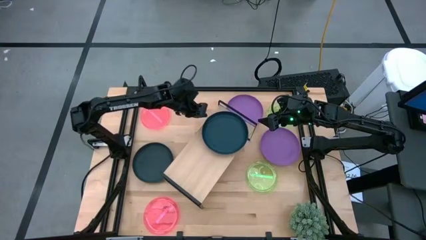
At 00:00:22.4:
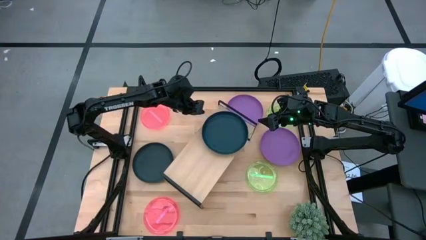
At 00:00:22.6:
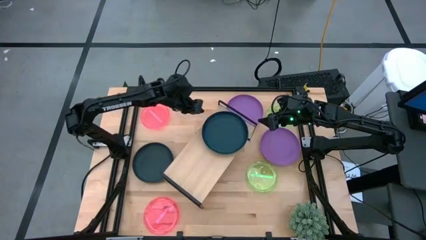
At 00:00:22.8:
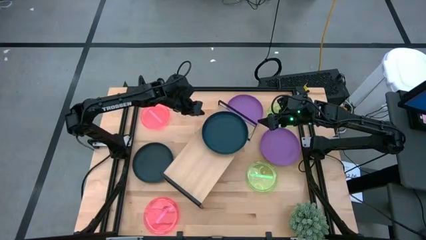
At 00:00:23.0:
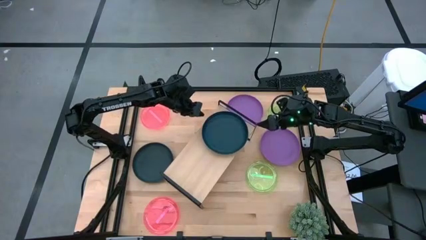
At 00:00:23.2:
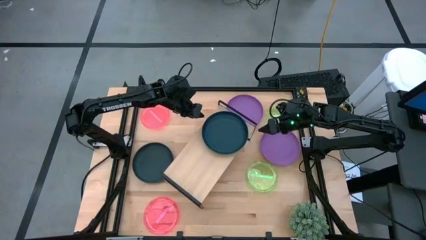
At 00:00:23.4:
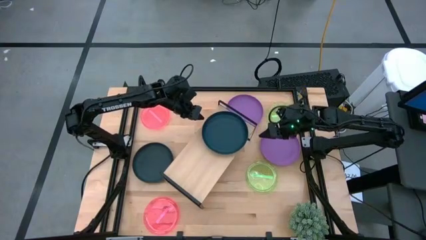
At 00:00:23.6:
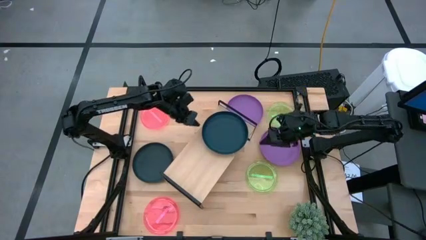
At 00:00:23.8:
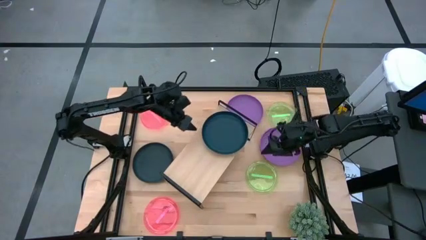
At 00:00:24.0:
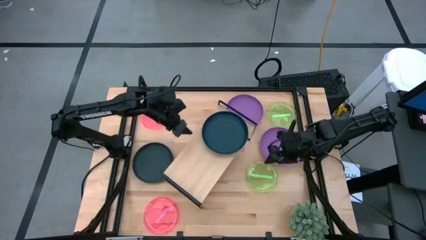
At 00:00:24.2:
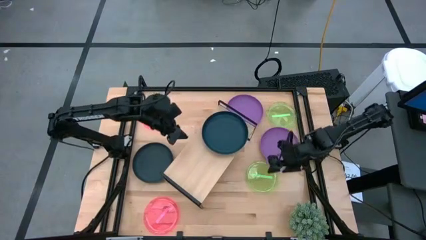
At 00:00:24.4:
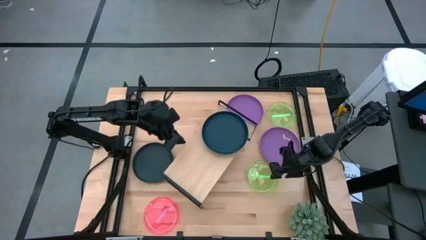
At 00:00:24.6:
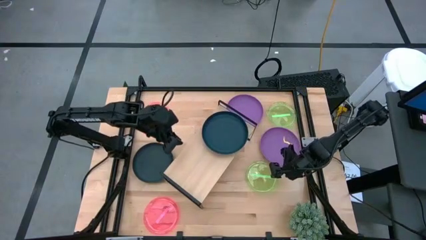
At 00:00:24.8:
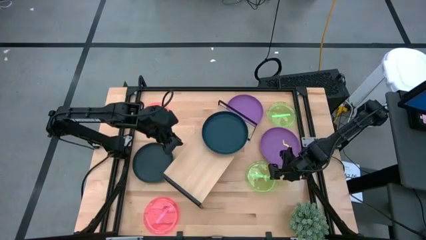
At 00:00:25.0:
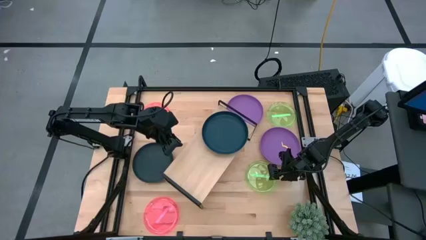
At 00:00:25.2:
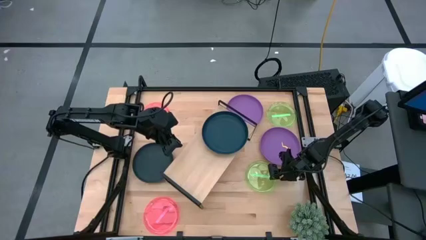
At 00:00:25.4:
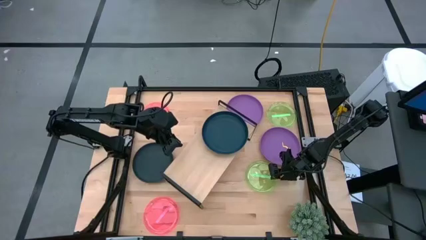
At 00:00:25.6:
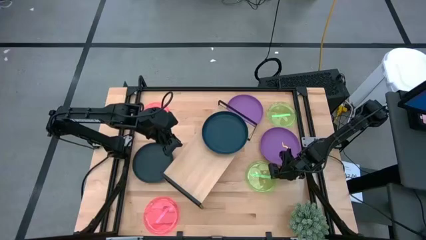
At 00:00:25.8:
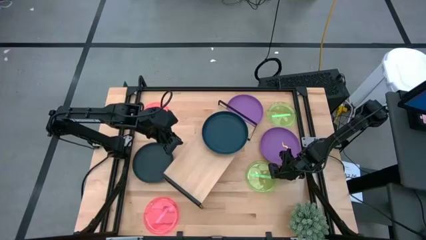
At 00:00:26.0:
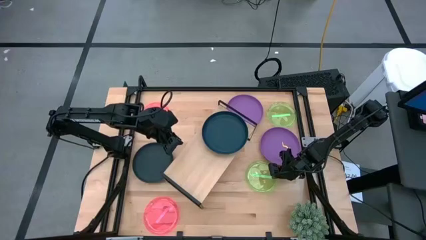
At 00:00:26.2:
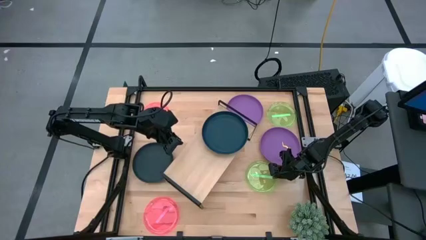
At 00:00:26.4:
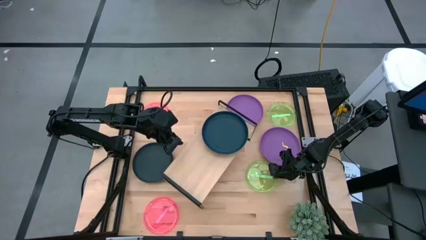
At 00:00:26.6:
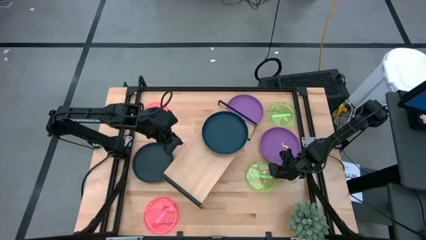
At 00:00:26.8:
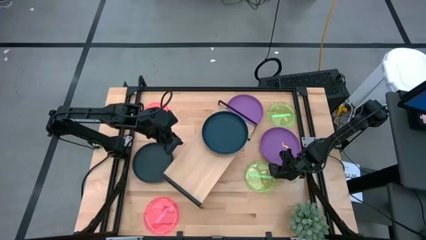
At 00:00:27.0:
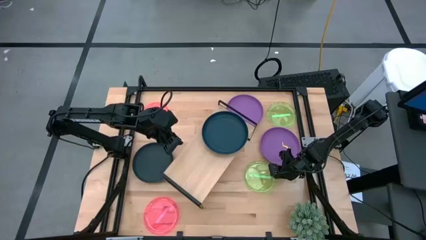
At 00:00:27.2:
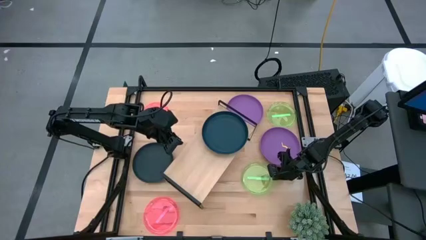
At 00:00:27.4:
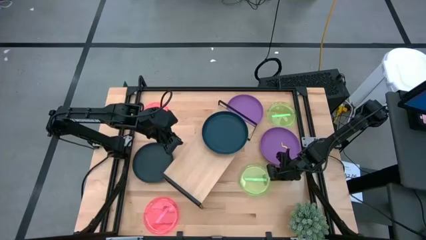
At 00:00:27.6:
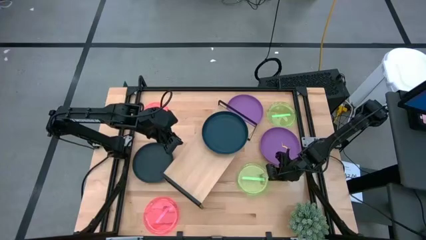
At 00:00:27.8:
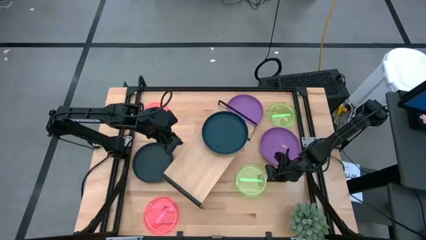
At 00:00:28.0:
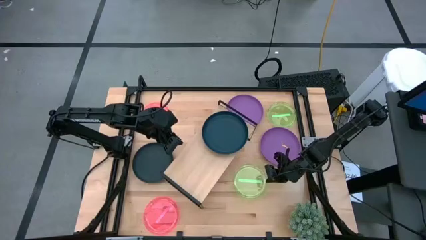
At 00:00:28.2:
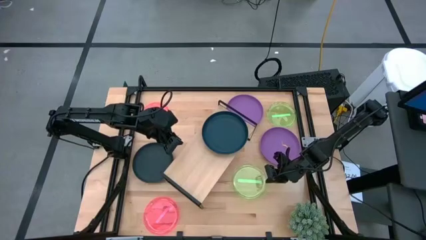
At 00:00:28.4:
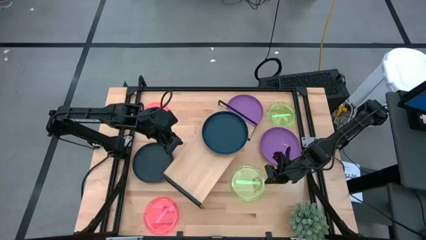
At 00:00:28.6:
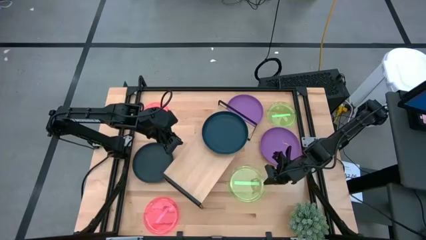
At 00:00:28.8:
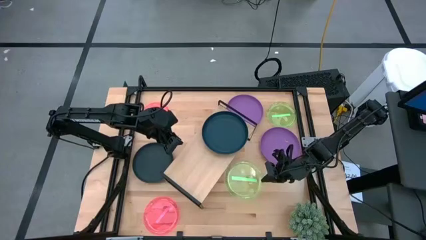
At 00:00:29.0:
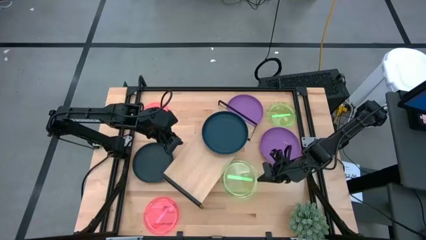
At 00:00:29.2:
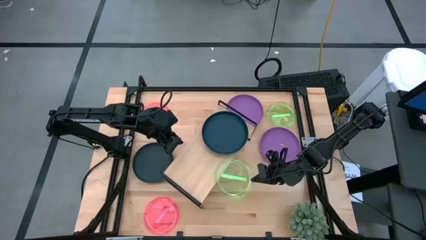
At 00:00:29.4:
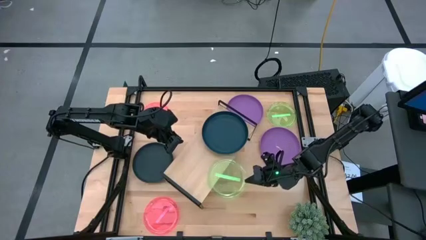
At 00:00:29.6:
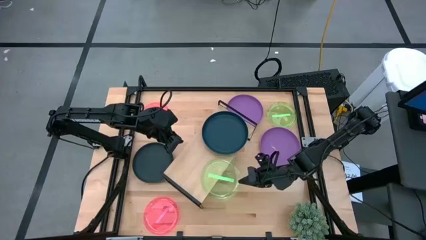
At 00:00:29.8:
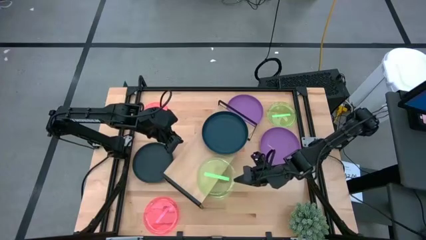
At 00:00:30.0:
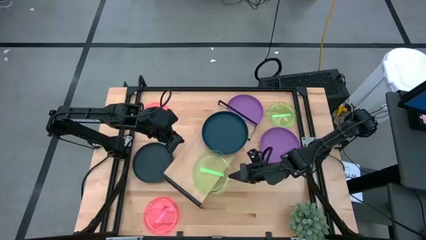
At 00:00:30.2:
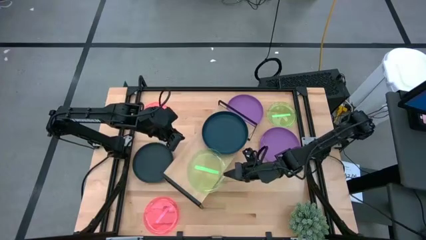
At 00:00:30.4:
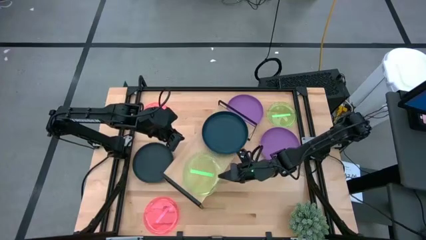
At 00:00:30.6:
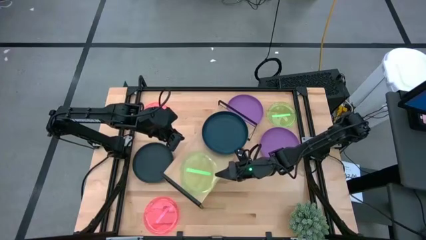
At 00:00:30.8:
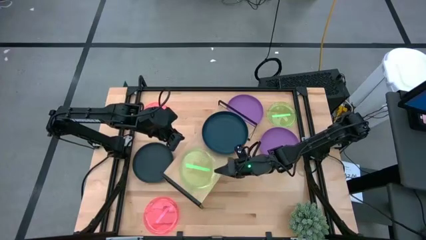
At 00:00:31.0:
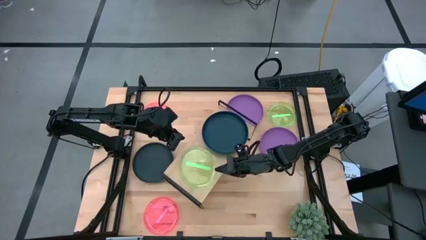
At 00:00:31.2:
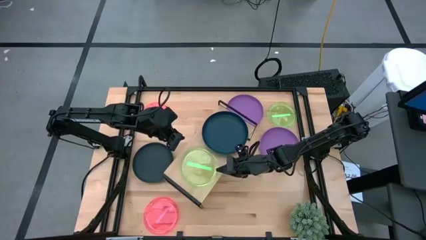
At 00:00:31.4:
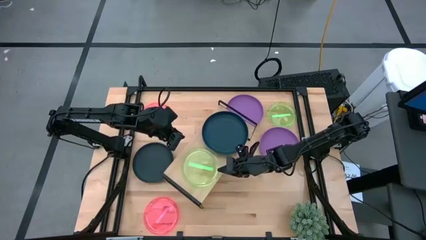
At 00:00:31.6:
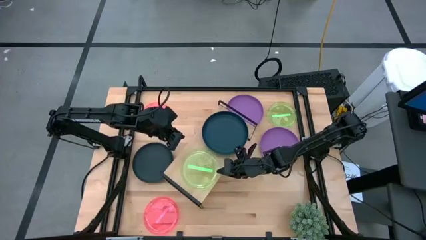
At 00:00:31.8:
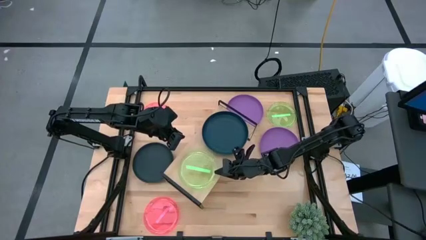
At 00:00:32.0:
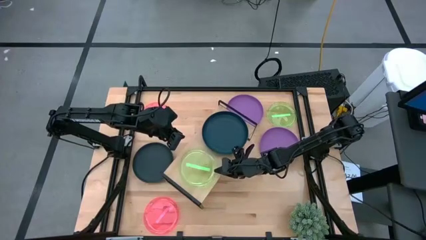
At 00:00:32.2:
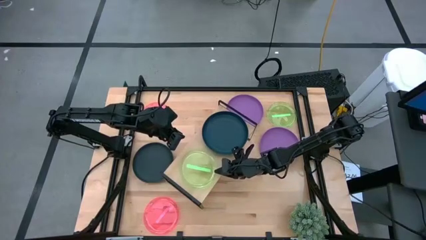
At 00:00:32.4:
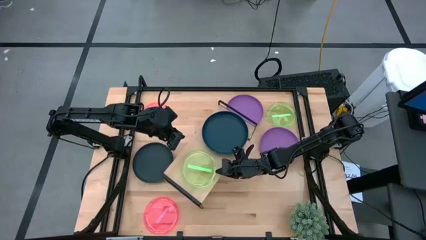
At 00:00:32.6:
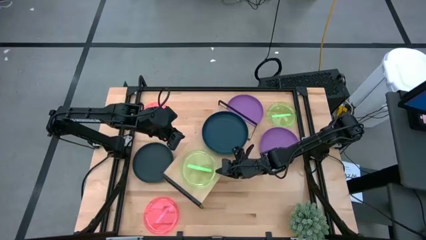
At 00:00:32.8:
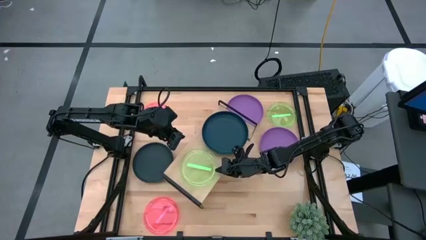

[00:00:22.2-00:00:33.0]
Task: Place and stack plates onto a shelf
Put the bottom green plate on the shelf

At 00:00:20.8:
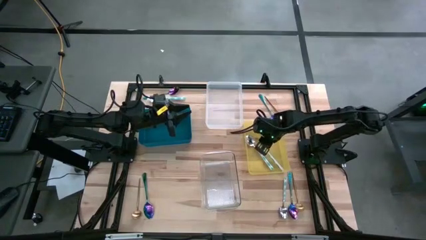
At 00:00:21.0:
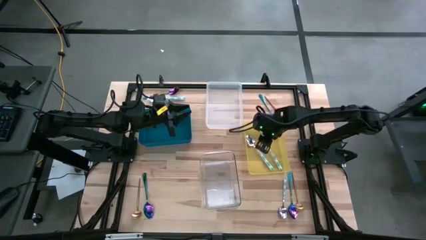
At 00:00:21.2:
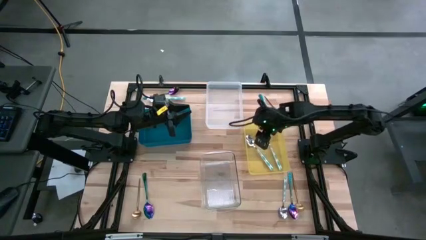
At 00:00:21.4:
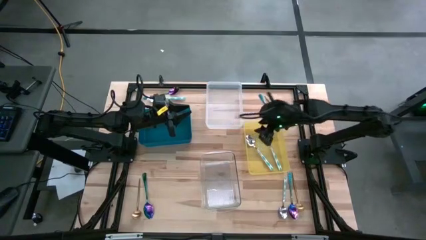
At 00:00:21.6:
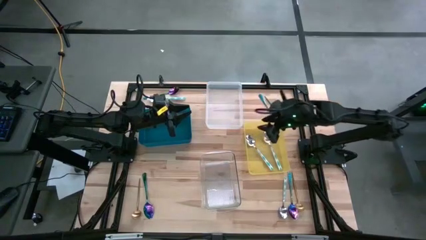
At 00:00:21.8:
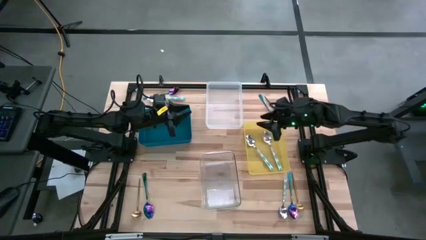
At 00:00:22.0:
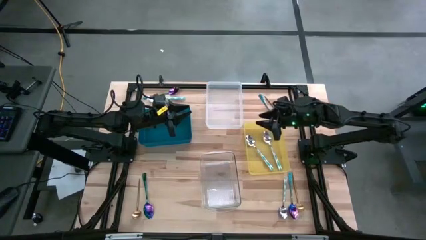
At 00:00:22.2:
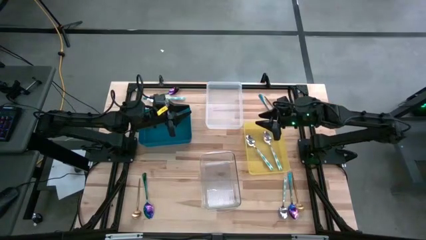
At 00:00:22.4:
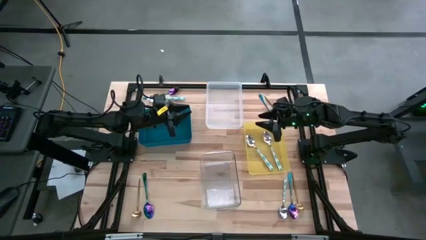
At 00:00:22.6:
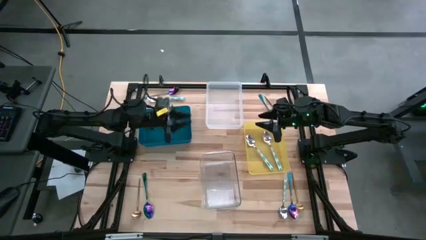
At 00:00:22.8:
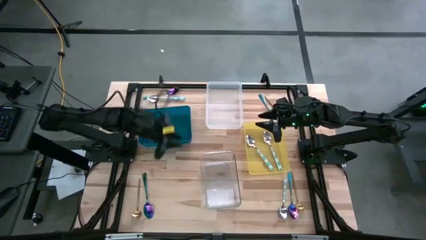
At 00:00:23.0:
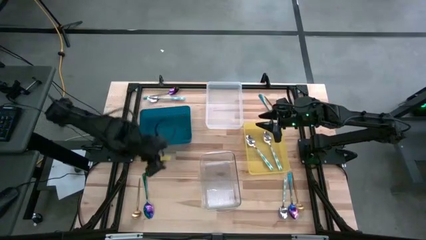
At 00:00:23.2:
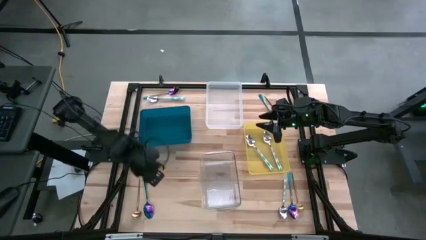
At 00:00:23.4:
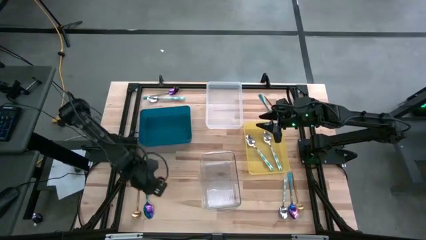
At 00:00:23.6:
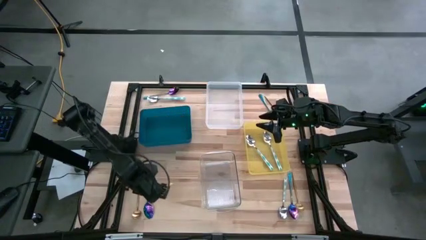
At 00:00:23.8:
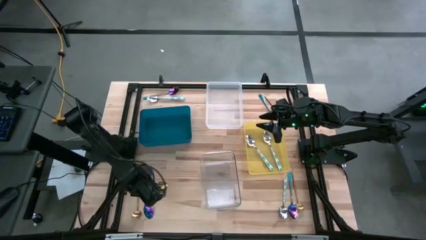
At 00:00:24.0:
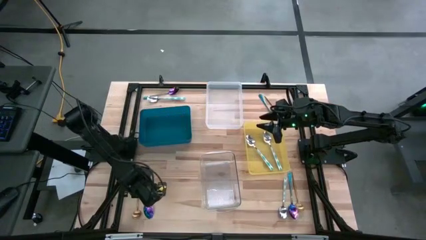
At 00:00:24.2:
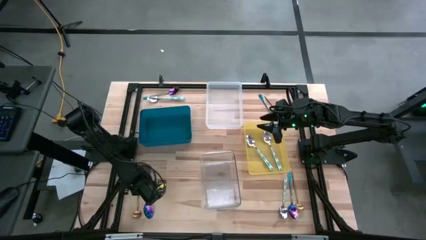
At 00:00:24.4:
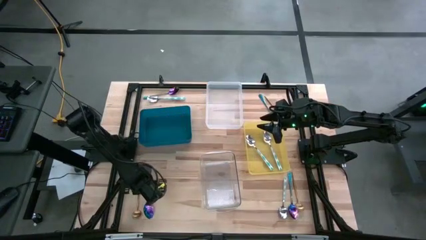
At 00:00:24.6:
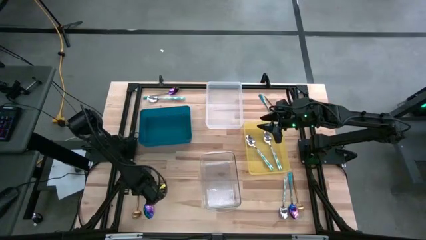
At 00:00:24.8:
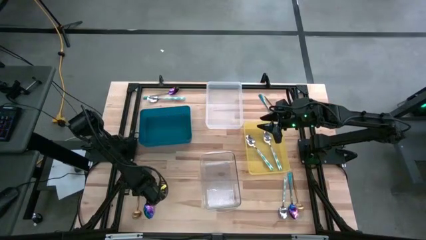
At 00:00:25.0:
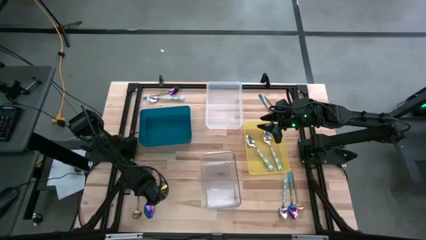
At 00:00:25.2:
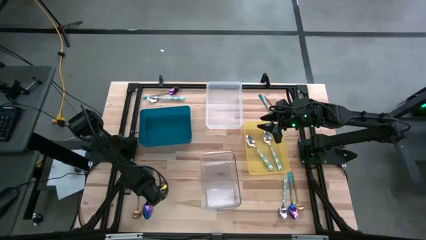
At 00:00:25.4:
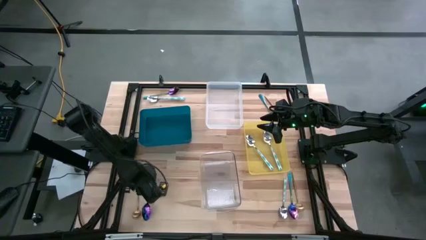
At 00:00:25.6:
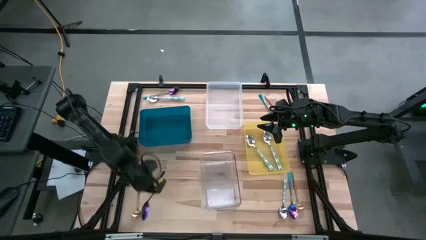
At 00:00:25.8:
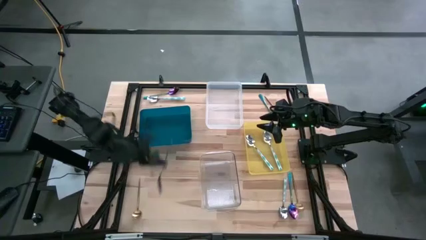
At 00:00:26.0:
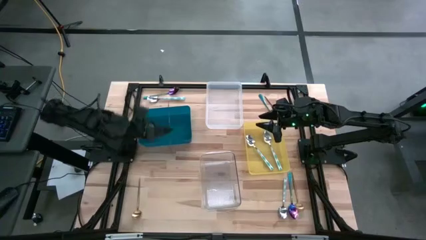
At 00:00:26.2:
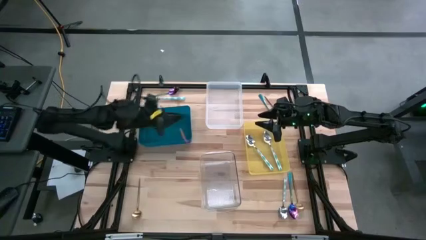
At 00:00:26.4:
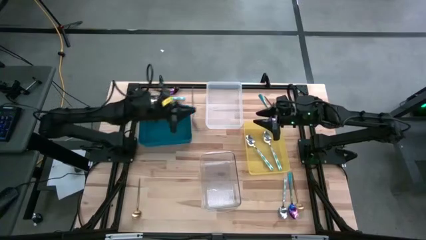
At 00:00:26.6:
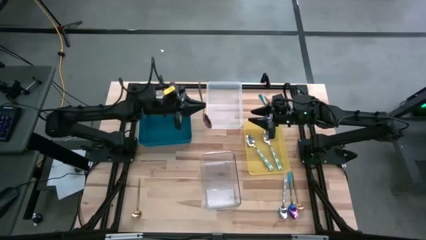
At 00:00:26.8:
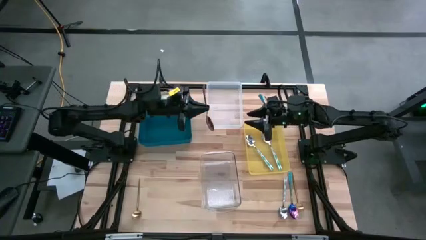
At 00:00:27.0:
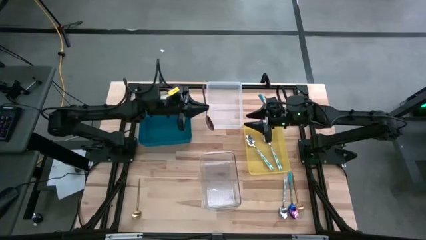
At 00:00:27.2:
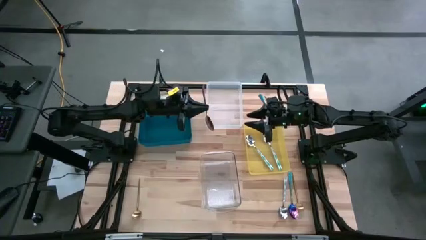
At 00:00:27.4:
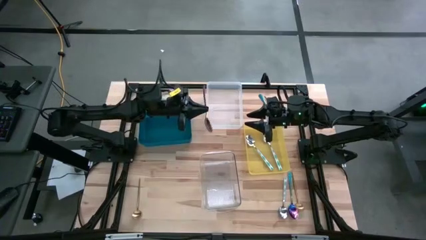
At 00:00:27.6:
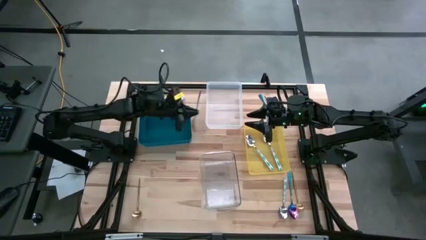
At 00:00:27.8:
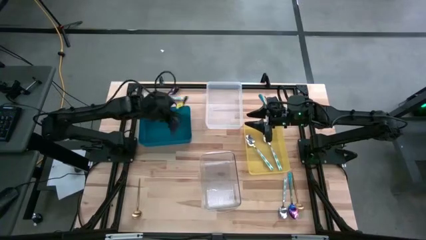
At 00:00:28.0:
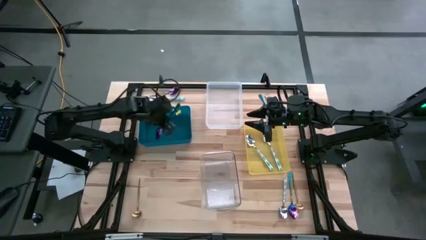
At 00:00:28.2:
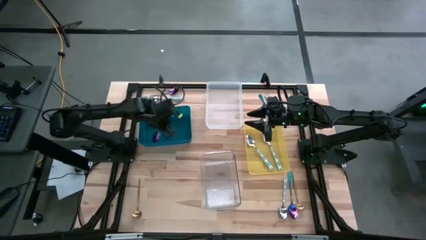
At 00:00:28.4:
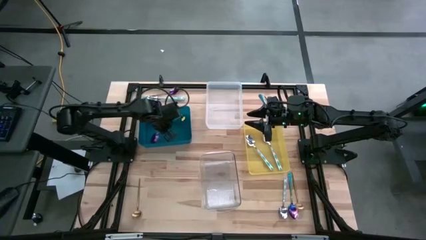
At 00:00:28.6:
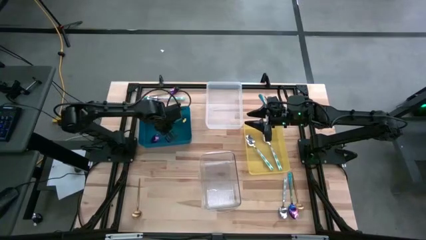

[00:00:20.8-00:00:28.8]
Task: Sort silverware by color (type)
Put the violet spoon into the blue transparent bin
